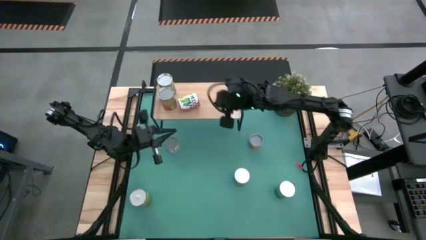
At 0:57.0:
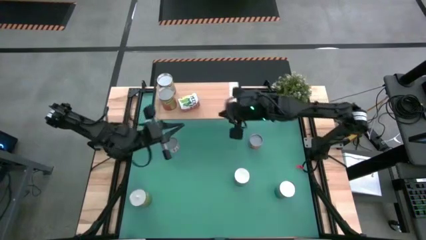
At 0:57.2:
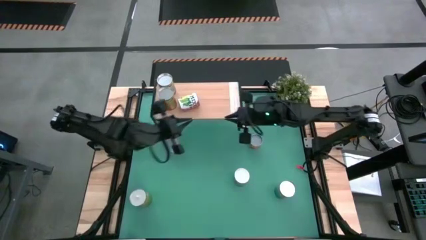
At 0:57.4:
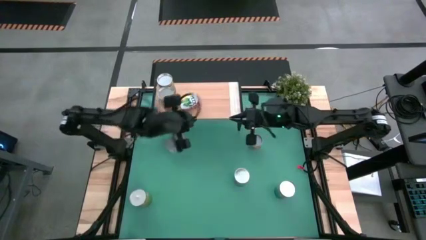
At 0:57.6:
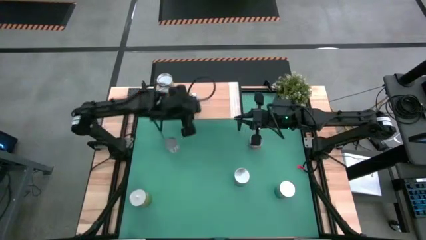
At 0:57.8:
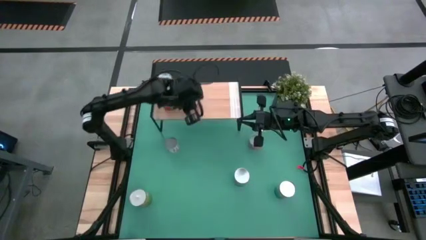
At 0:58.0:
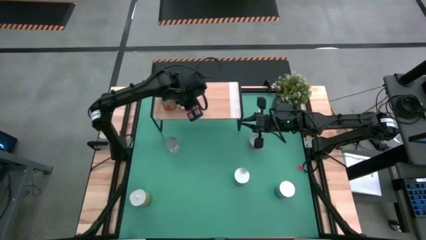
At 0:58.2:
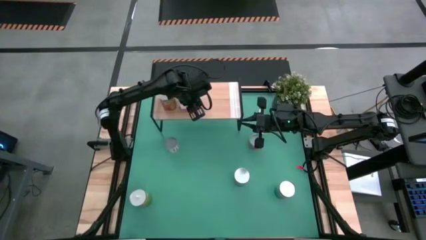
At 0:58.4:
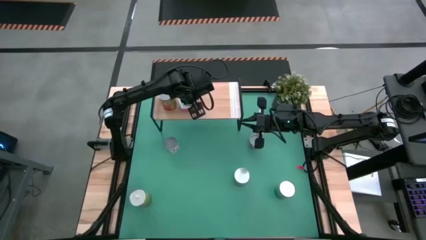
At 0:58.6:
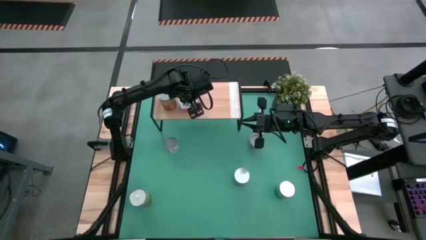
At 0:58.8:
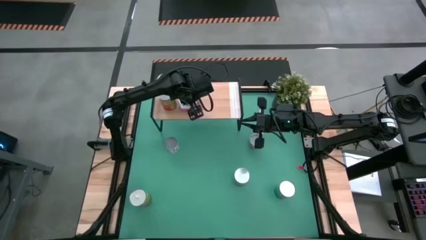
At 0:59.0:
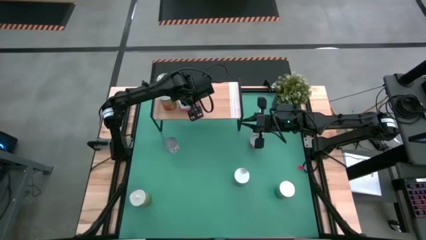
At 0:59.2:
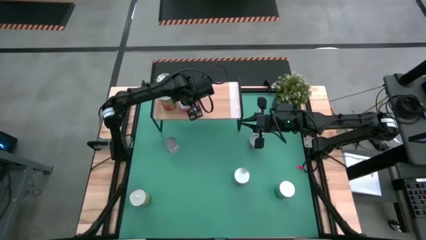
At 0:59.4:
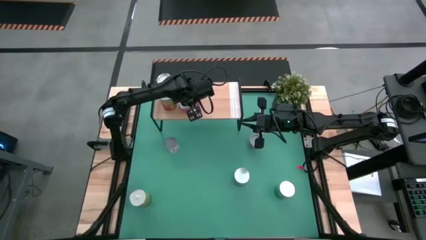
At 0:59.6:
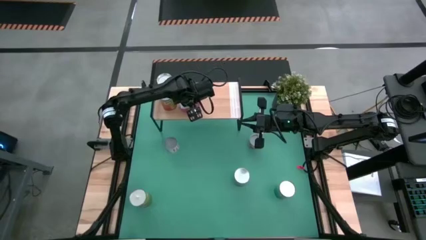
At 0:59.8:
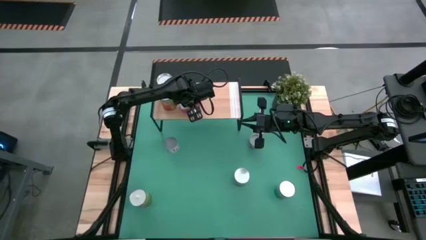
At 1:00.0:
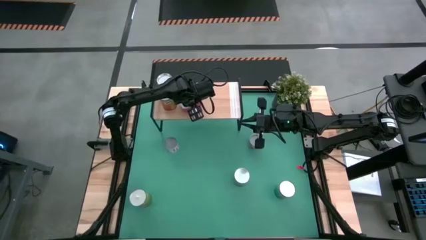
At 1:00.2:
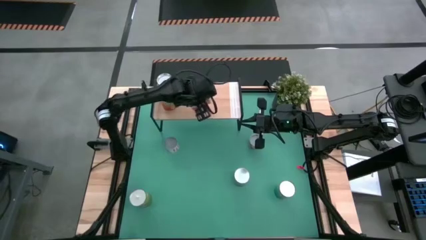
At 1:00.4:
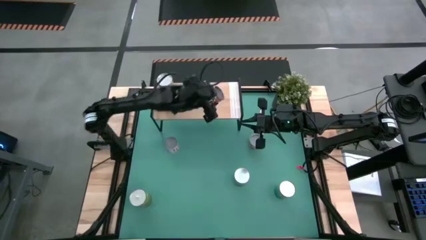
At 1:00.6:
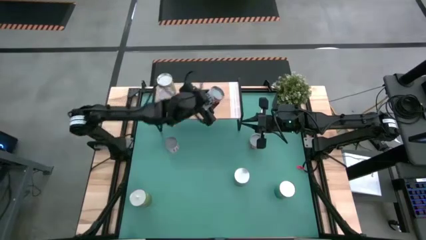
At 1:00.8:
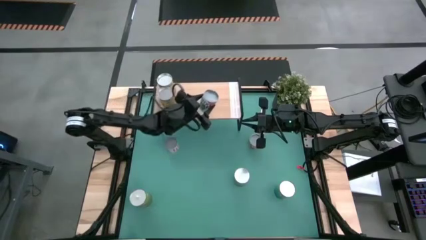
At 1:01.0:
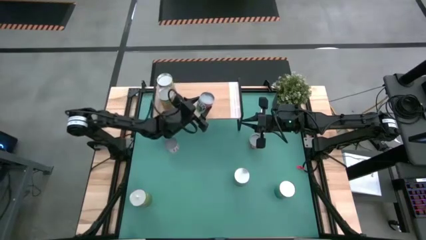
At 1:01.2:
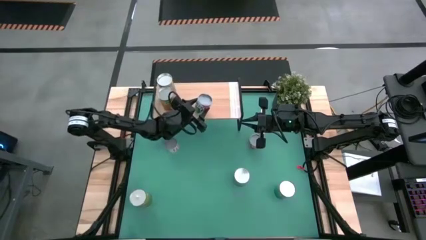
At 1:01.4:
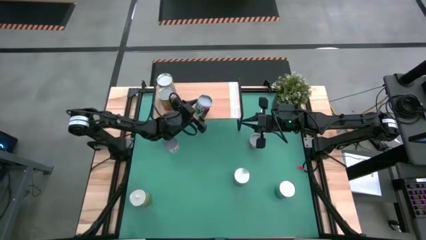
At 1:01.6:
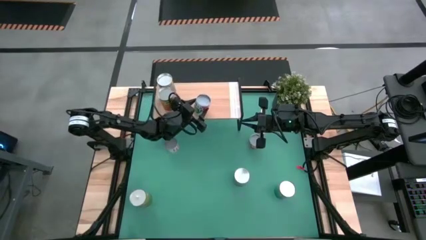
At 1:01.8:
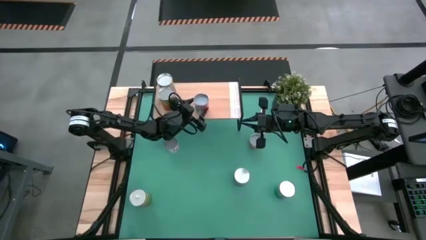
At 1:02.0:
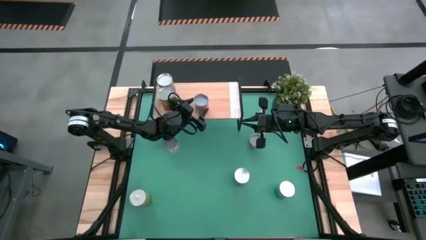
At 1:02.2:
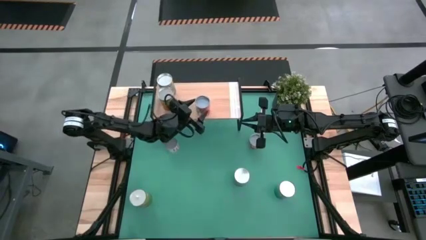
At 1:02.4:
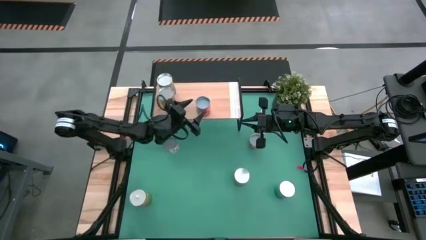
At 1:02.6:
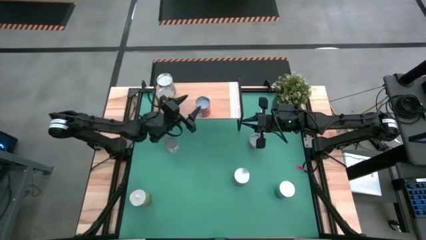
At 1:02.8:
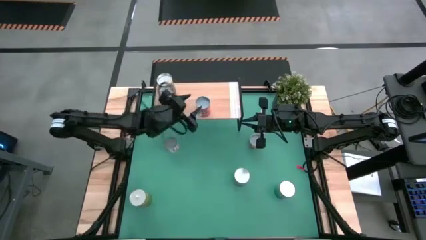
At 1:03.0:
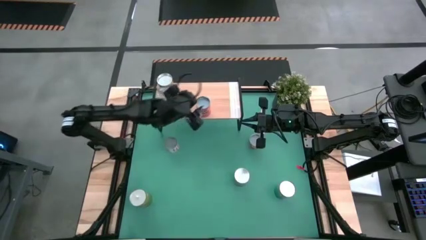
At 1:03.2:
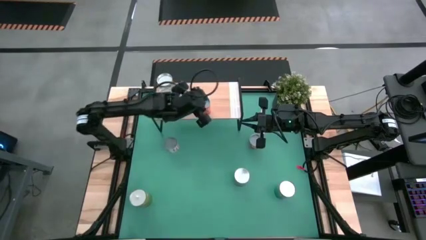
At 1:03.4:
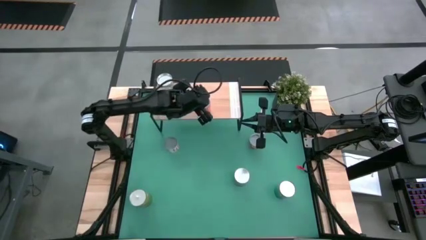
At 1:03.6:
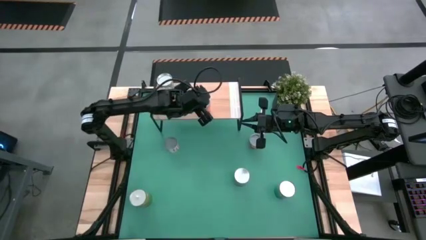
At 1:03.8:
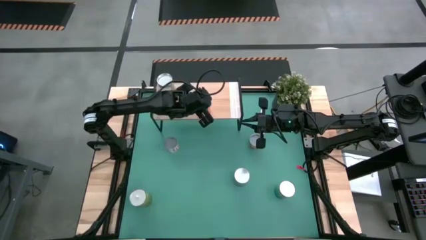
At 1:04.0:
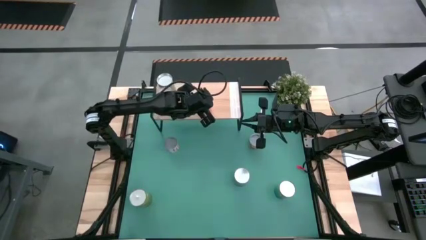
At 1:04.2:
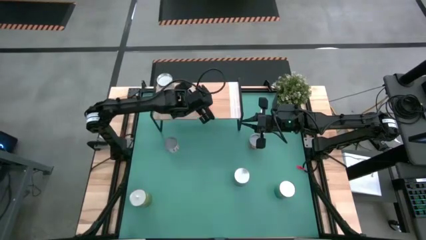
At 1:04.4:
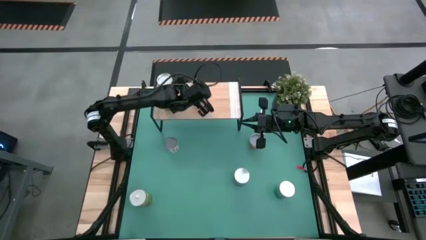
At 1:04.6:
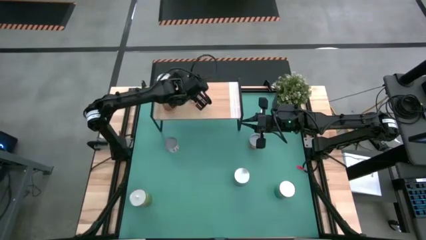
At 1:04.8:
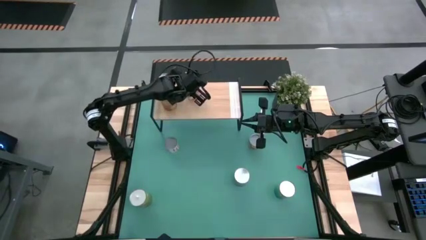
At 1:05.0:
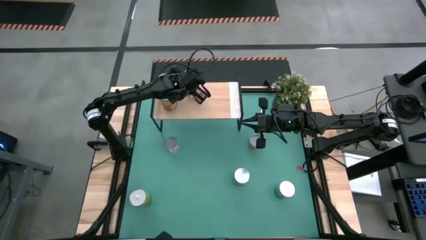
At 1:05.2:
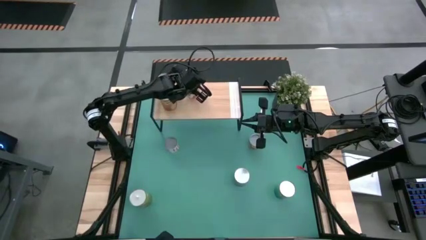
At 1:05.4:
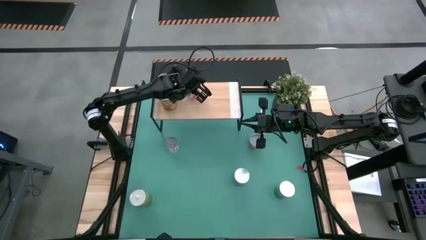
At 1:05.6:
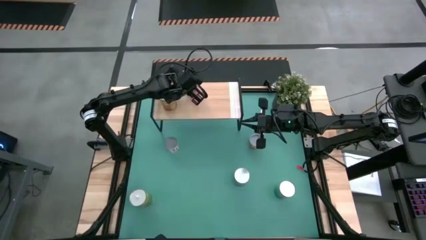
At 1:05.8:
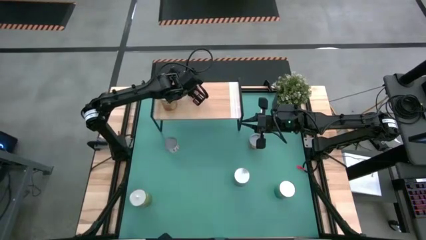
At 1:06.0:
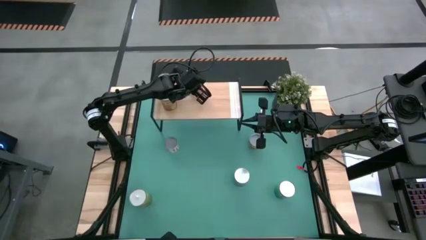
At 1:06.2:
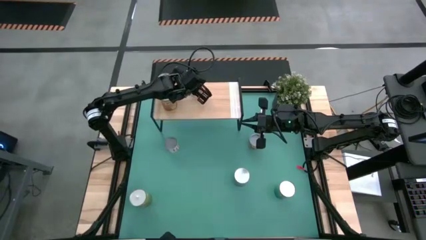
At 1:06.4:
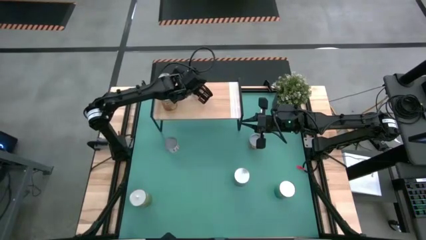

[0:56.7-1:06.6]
Task: Pick and place cans onto a shelf
Put the canned mixed fruits on the shelf

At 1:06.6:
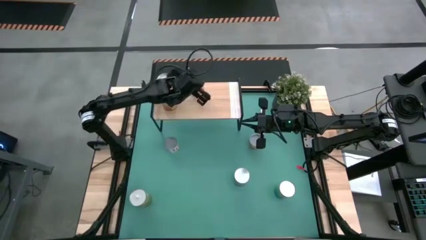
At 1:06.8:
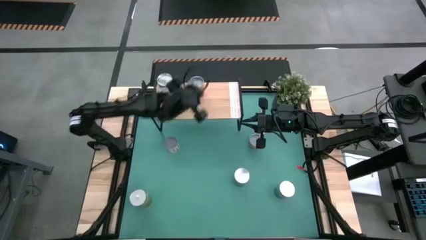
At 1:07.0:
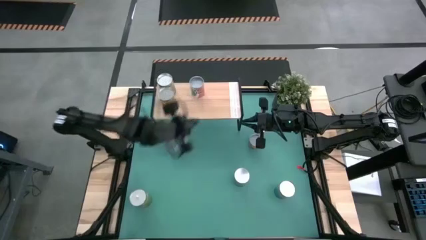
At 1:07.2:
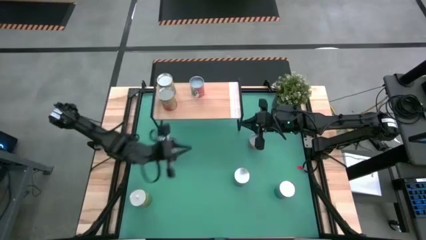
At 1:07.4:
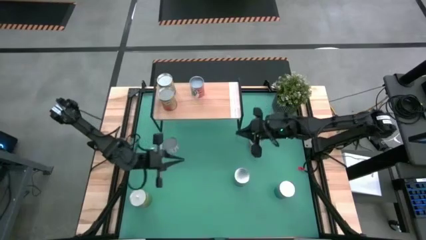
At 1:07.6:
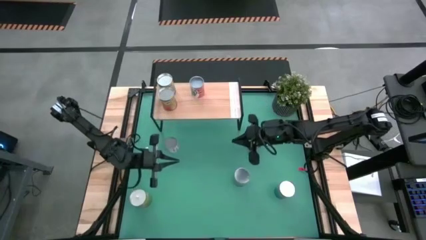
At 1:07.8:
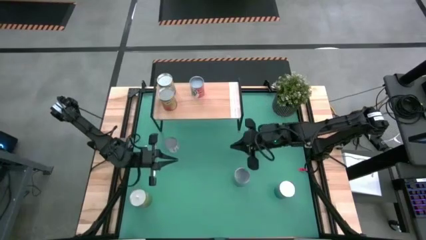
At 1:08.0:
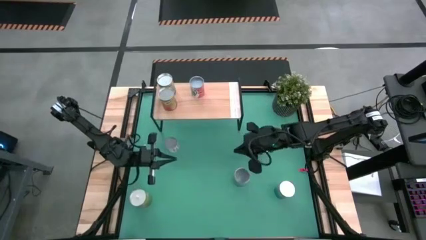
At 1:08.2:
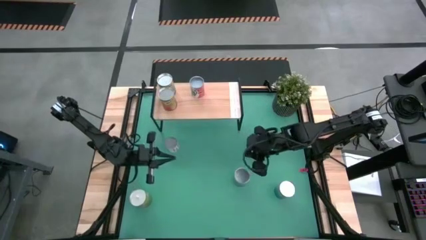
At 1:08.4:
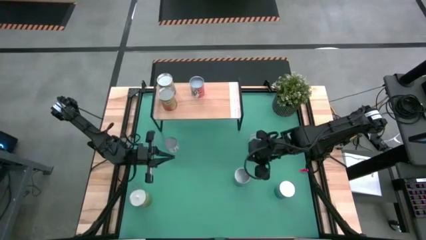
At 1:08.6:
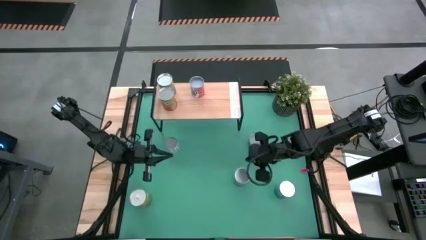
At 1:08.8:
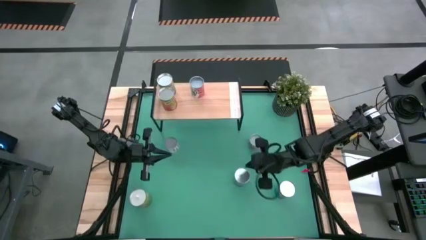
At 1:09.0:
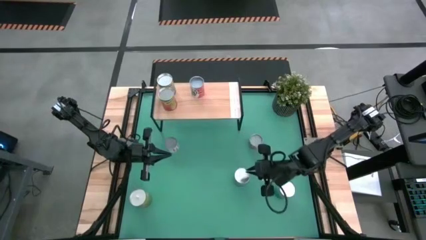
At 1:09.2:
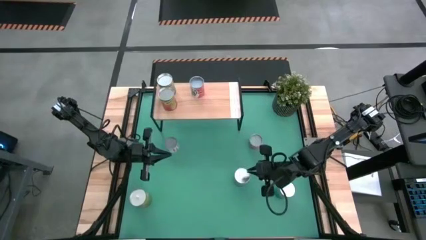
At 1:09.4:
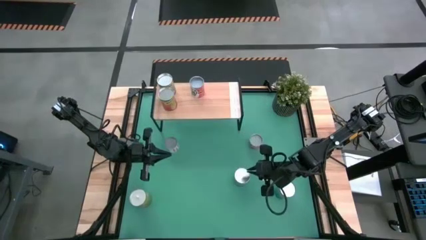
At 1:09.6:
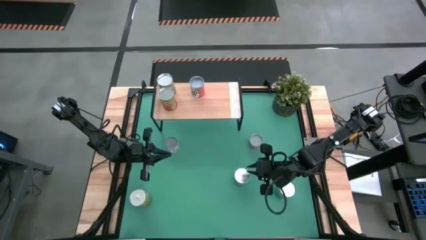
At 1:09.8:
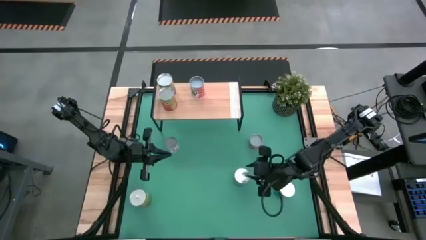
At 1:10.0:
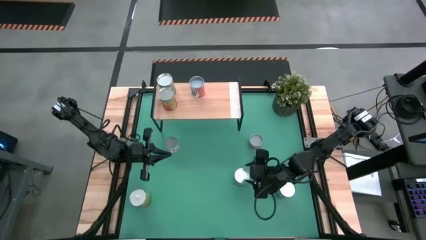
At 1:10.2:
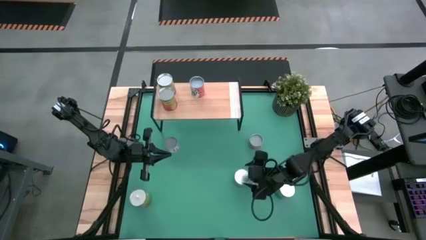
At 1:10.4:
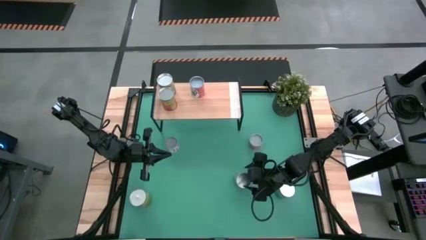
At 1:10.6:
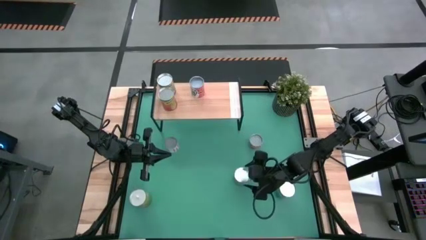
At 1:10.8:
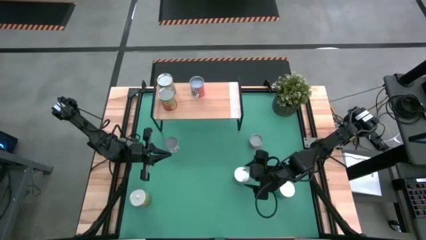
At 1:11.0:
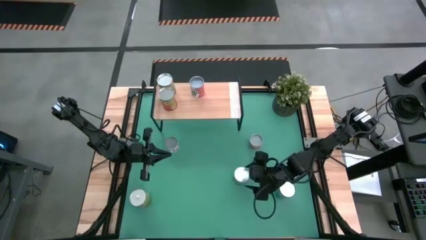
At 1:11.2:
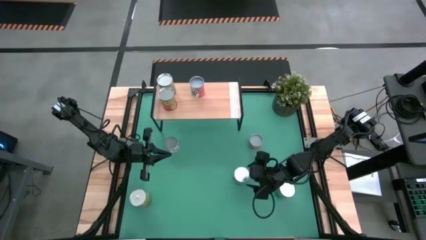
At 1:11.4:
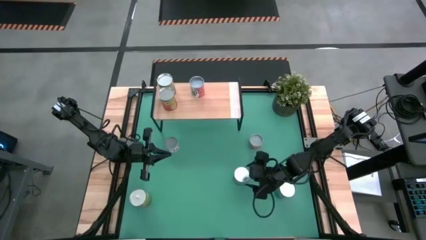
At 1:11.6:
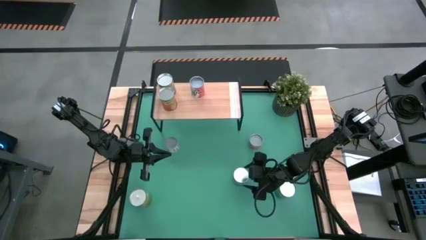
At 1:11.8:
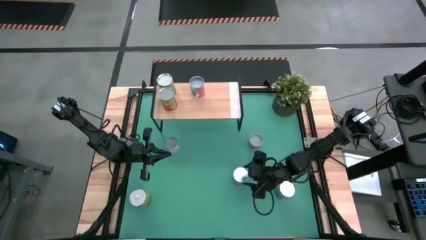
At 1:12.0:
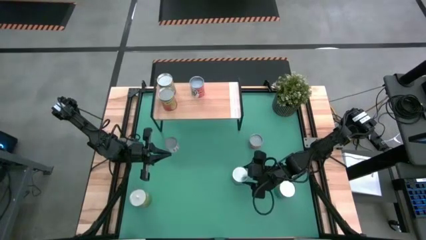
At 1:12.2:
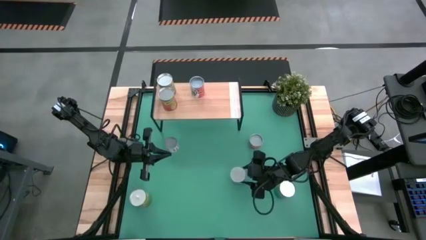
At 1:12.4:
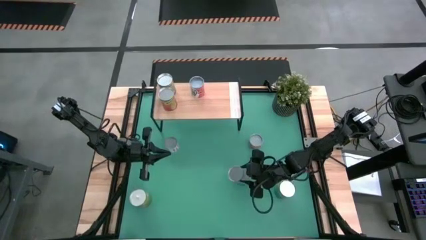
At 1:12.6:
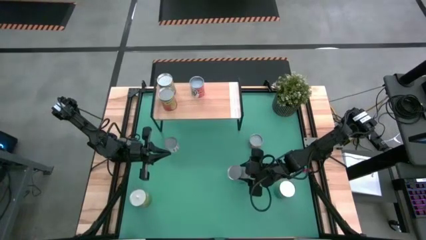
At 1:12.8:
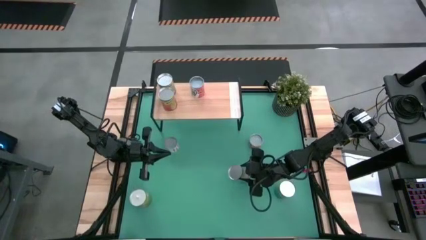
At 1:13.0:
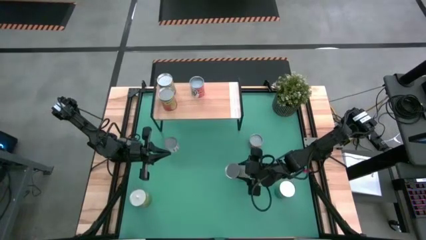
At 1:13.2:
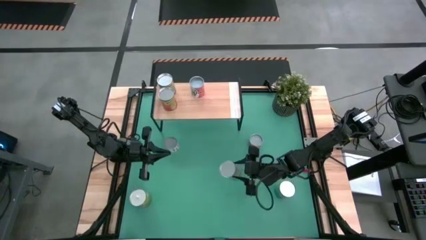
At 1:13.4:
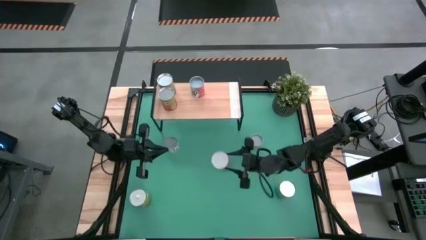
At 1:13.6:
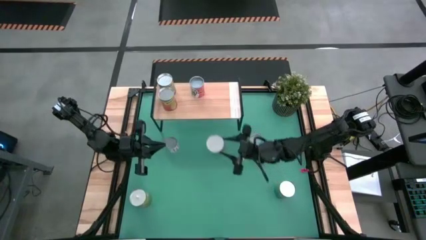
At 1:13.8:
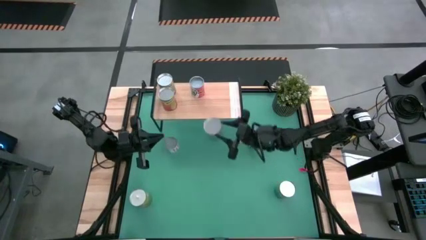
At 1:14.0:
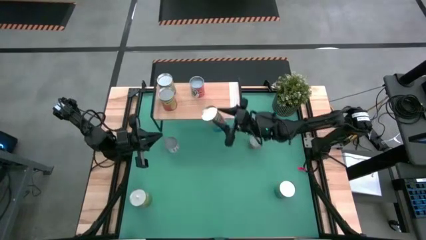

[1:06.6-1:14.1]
Put the canned tomatoes on the shelf
